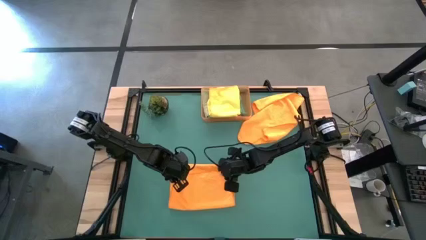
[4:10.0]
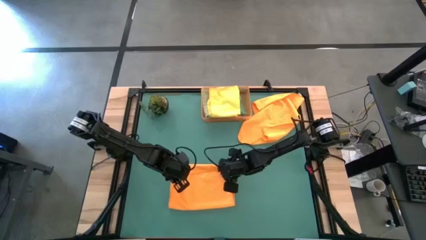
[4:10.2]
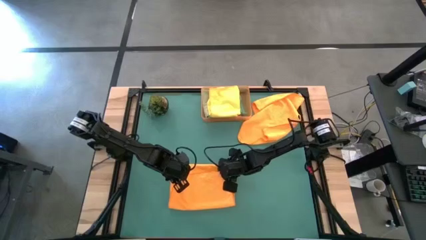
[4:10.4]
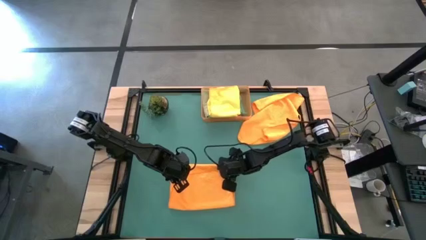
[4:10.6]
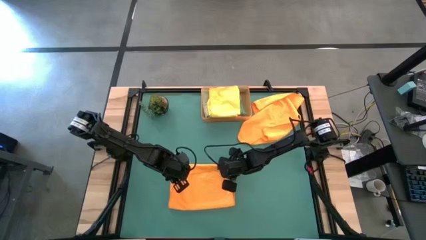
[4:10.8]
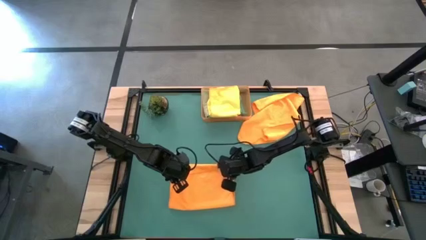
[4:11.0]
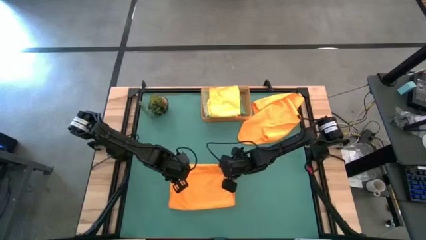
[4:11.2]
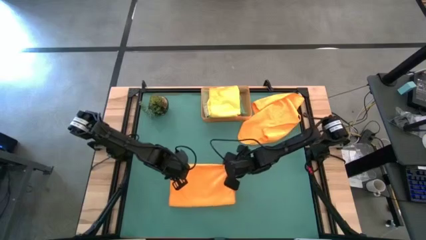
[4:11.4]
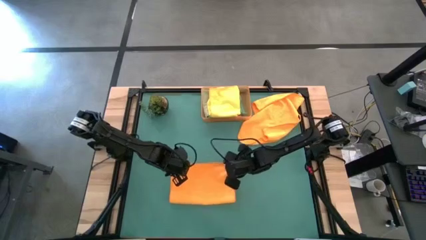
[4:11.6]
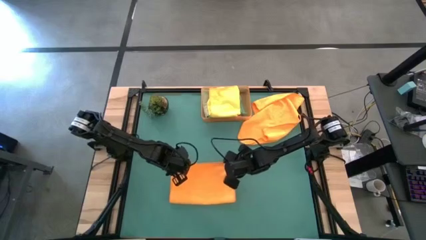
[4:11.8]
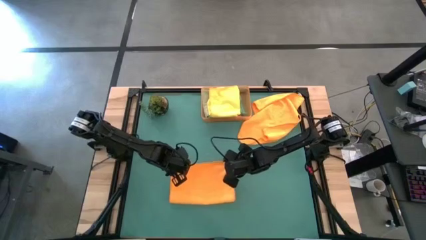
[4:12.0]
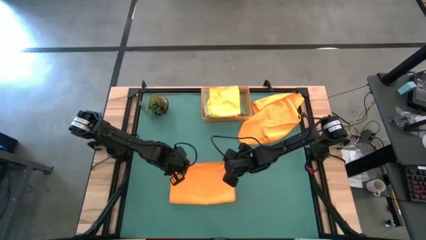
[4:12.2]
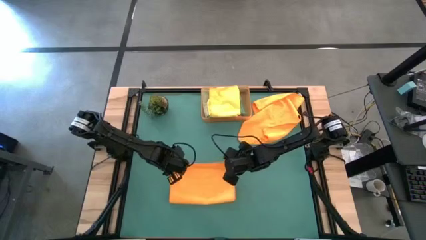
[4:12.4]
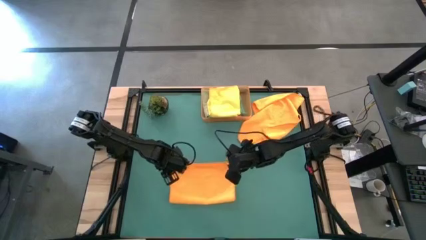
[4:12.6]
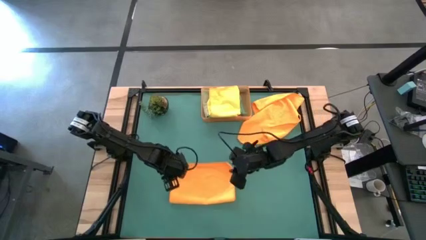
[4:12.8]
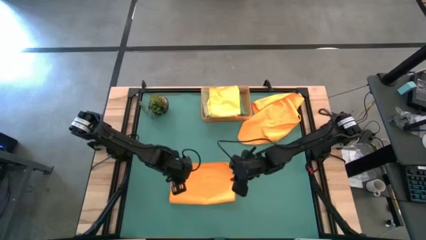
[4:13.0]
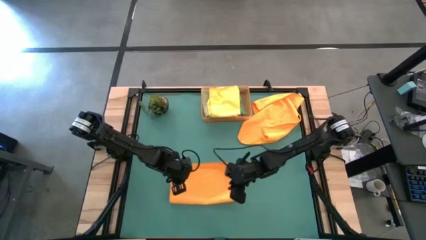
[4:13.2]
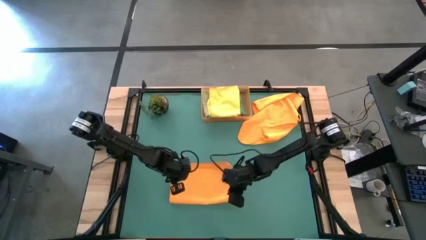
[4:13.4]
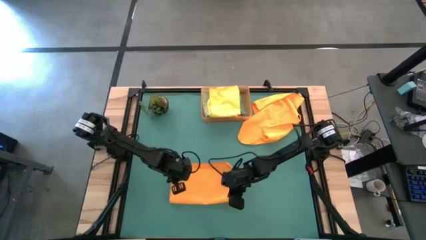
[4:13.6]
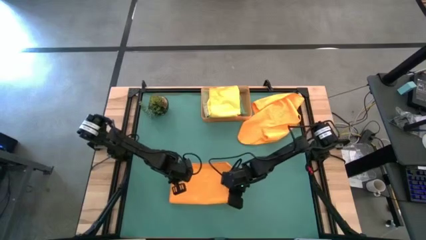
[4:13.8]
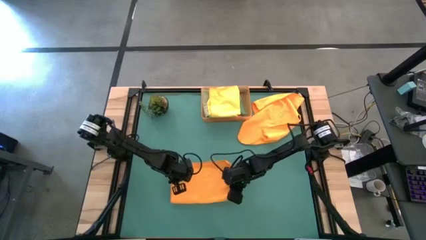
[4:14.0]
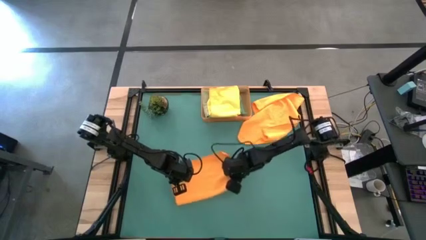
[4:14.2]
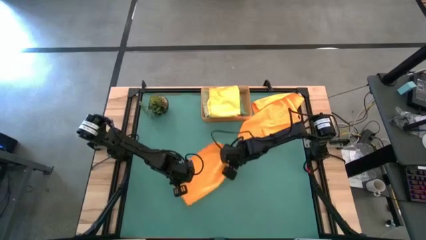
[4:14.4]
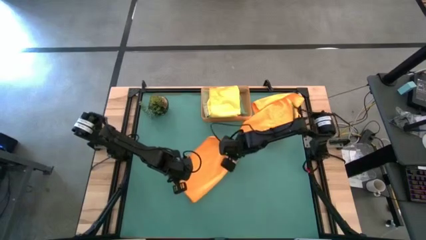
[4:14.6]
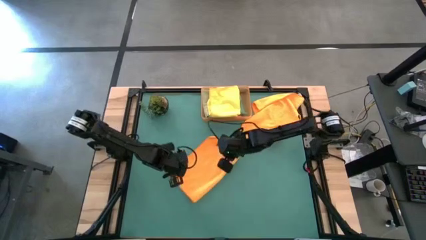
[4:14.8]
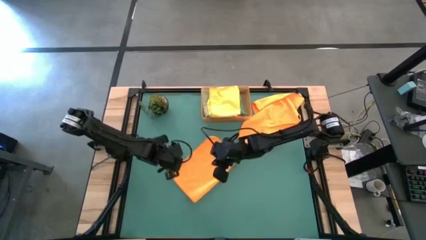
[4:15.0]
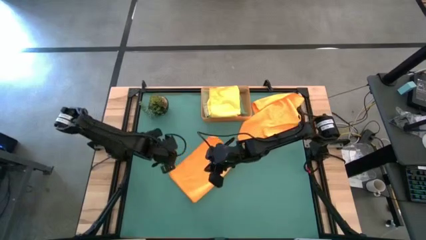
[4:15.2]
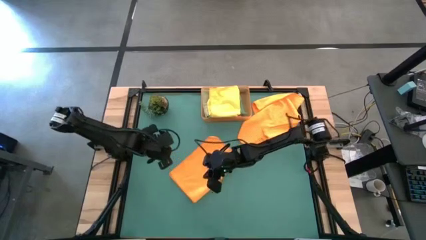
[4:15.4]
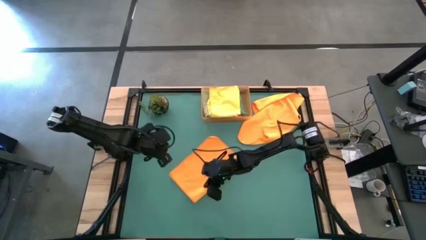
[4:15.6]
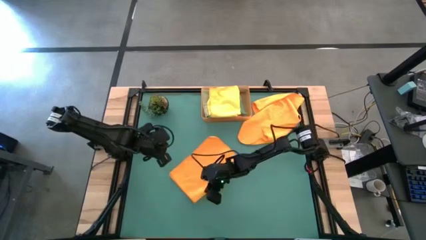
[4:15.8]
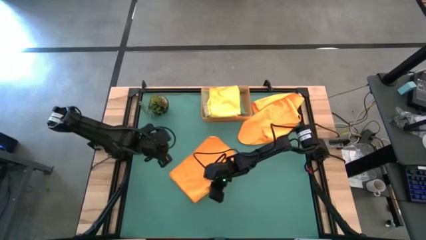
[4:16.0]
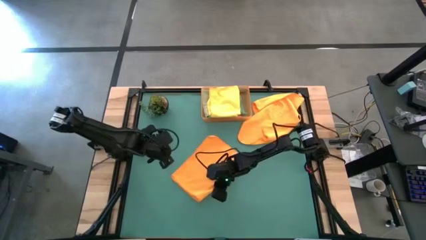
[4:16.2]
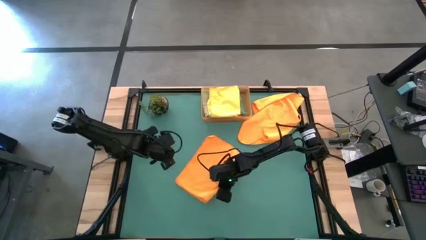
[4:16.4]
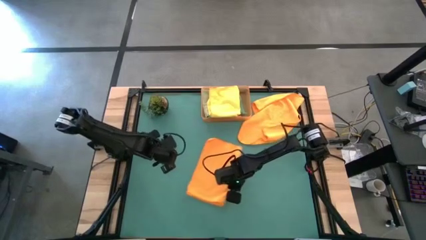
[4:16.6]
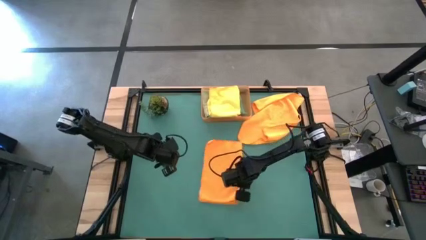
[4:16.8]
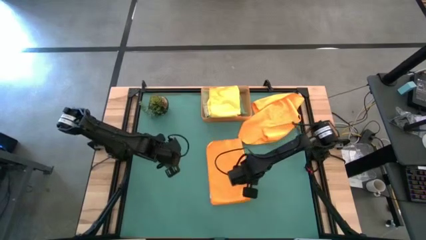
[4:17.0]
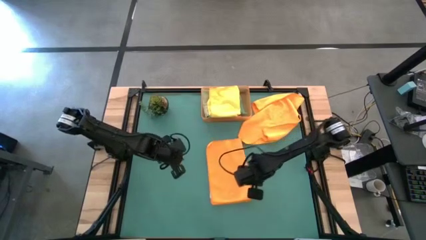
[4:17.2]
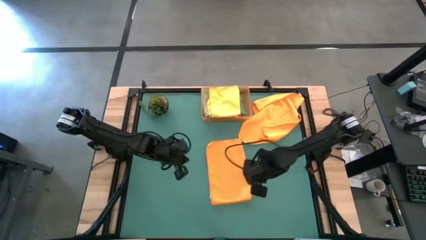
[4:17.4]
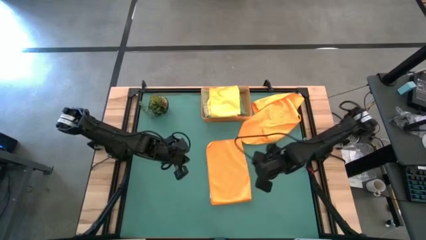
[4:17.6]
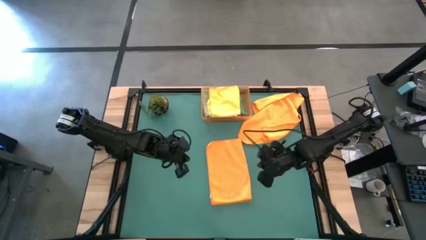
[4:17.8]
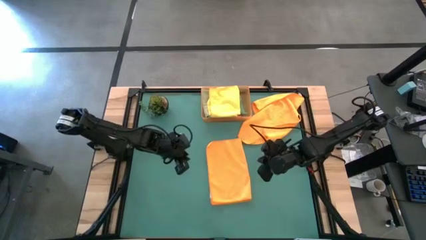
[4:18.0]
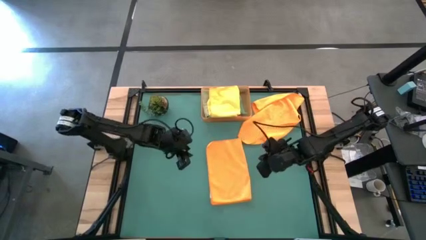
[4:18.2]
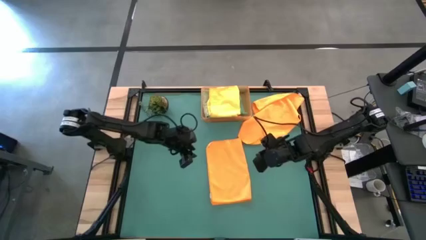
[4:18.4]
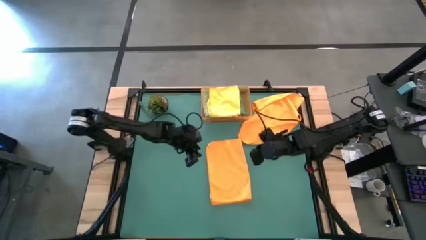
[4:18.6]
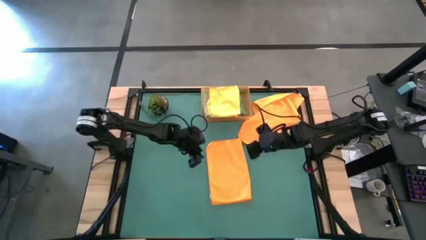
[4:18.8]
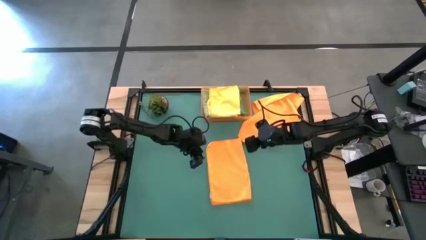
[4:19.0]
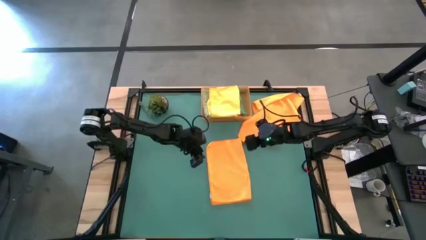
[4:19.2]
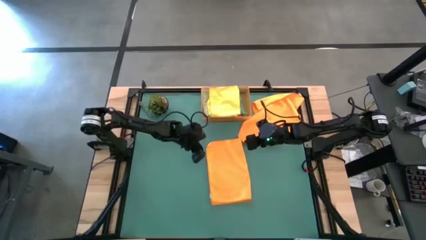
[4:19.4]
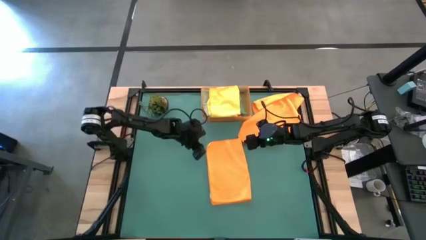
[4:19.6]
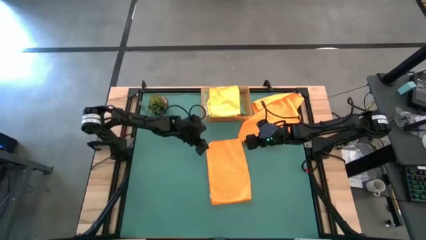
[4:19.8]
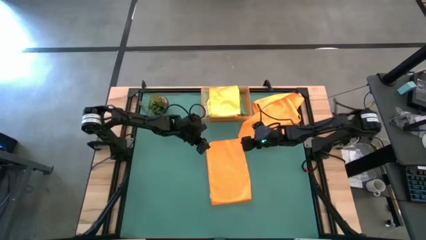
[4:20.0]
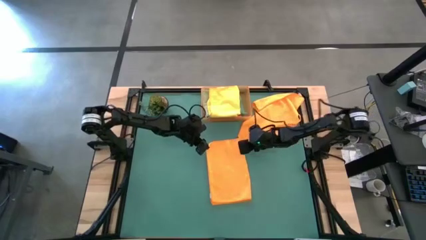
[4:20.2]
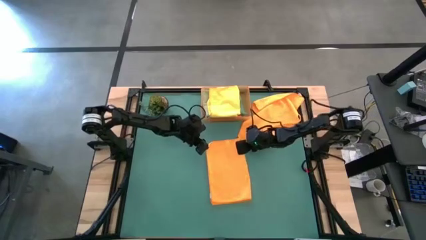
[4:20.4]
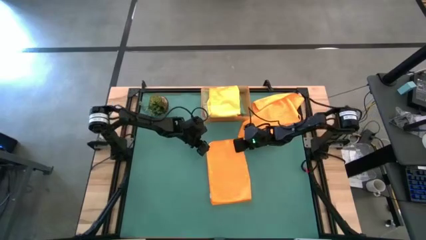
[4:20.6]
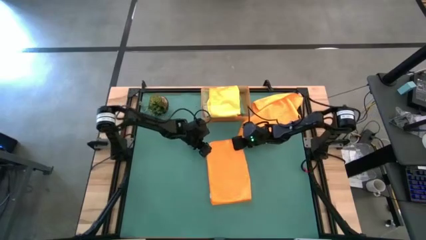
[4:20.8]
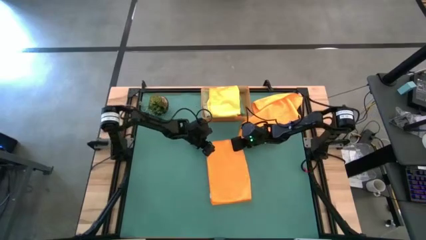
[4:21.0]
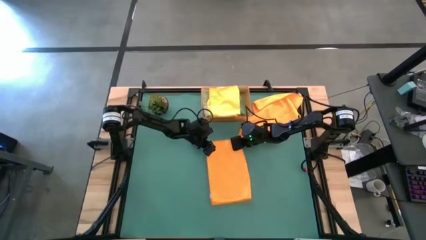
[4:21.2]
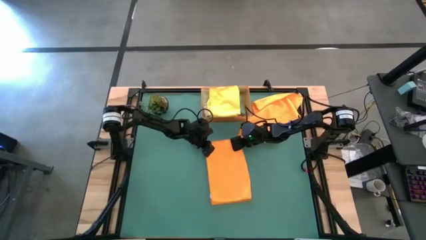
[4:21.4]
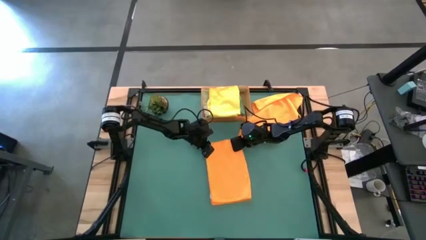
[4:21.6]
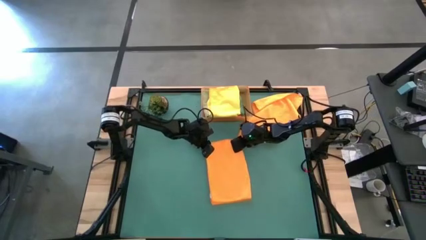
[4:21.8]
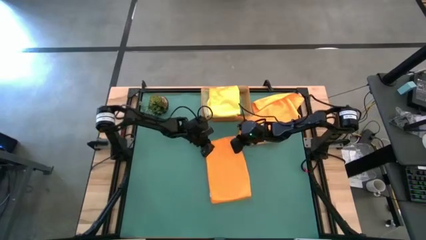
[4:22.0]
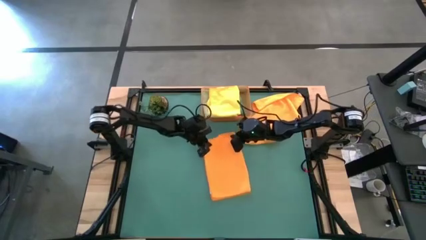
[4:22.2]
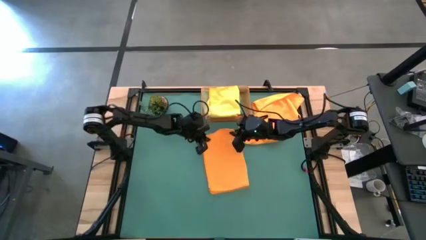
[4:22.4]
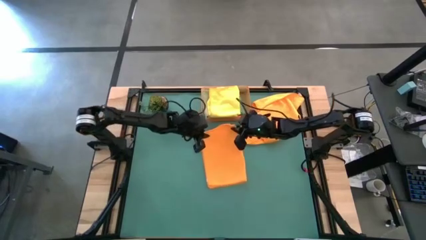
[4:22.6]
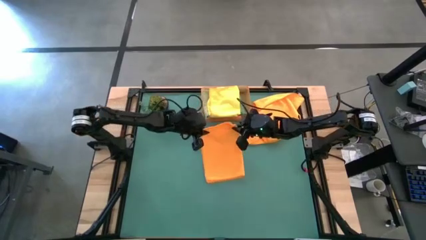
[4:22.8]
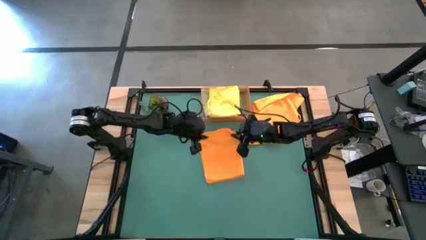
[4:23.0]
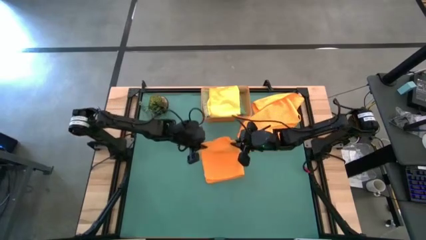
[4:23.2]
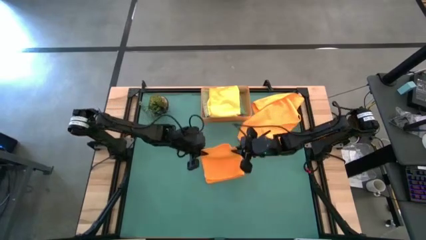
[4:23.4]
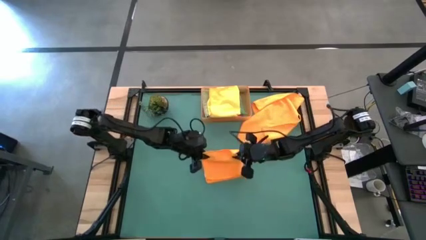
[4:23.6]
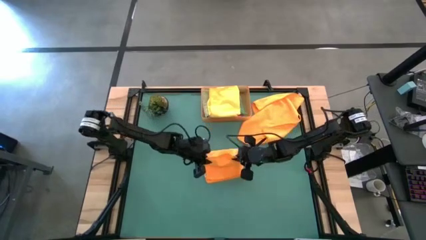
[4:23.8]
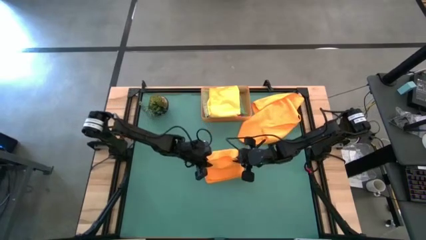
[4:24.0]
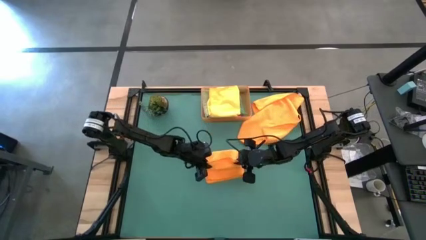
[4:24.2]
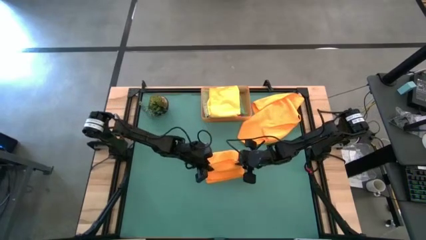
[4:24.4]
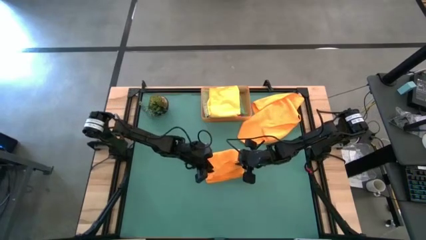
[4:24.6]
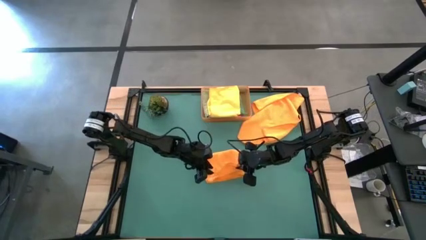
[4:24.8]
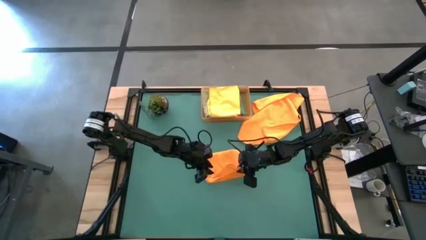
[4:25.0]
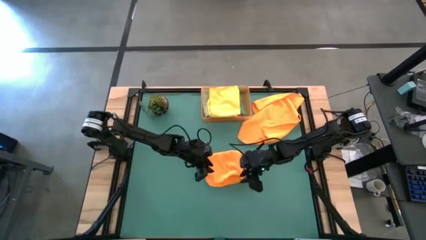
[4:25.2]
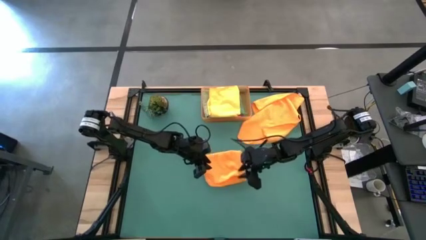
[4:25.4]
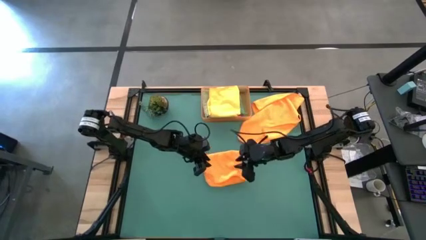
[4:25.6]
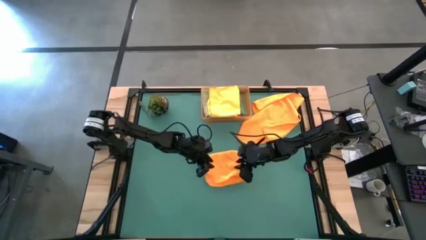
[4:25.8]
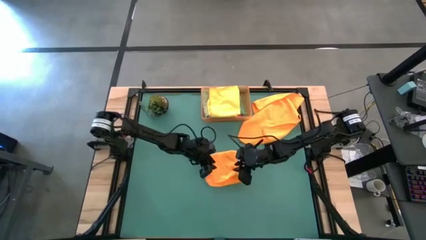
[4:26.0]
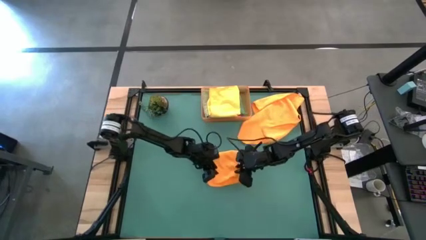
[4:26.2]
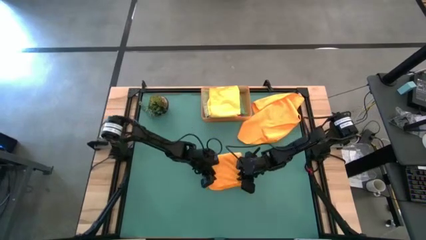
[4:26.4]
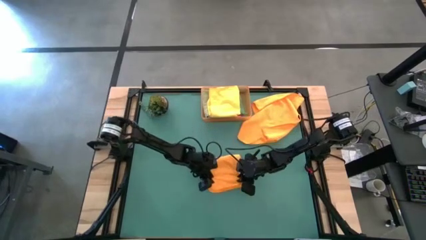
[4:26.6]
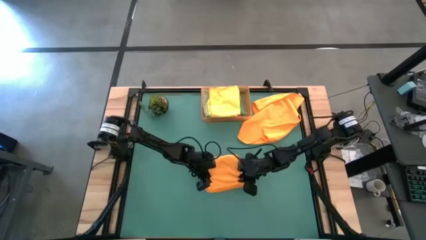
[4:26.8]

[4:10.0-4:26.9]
Task: Fold microfiber towels
Fold the bottom orange microfiber towel
